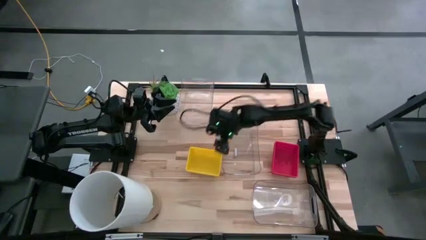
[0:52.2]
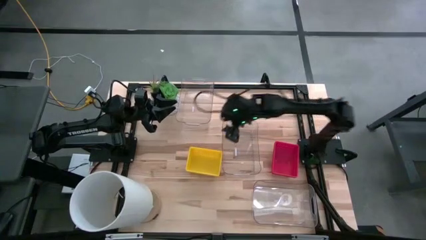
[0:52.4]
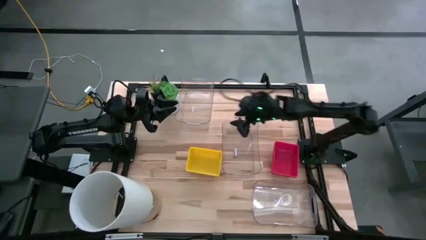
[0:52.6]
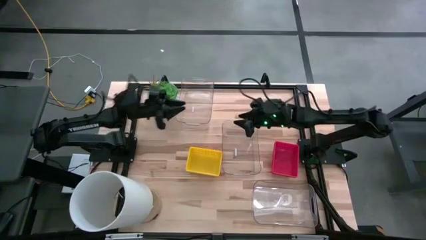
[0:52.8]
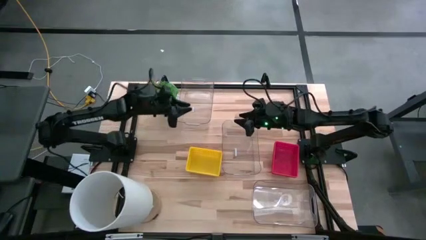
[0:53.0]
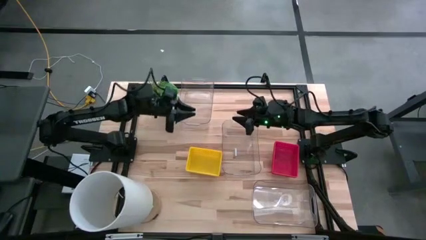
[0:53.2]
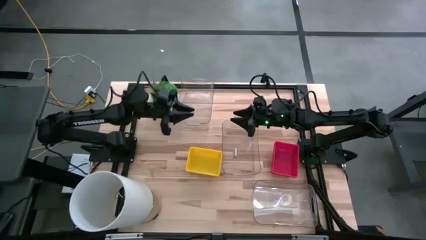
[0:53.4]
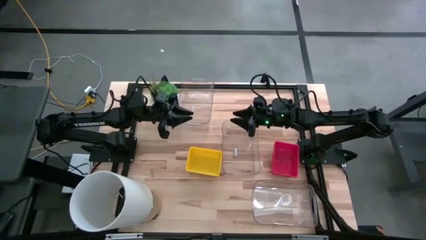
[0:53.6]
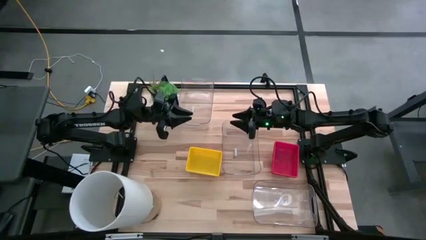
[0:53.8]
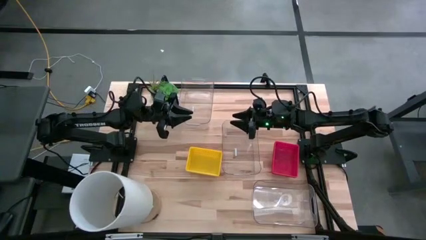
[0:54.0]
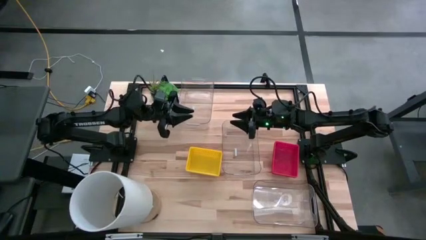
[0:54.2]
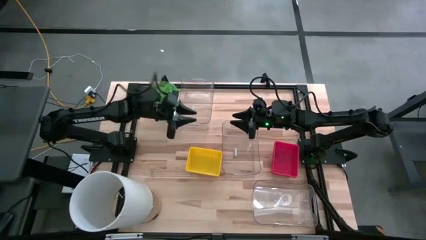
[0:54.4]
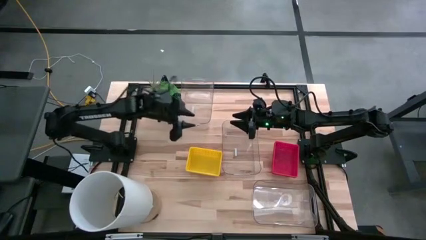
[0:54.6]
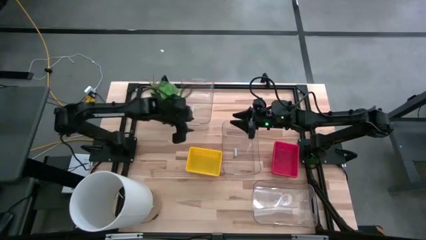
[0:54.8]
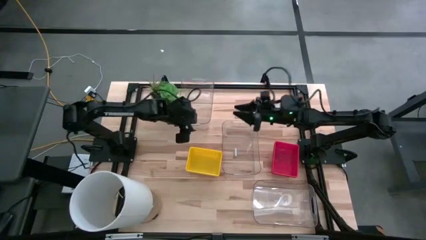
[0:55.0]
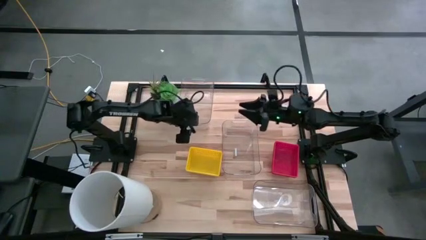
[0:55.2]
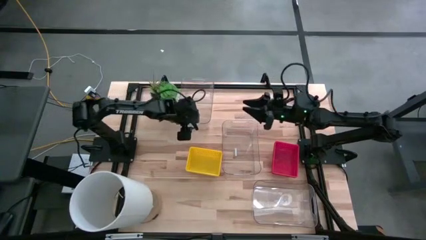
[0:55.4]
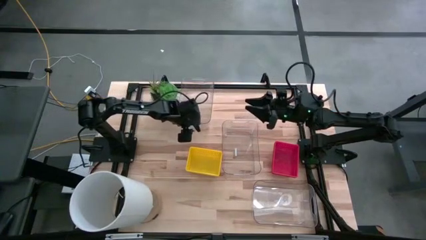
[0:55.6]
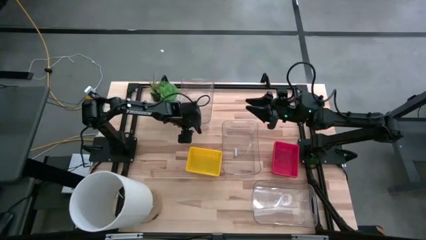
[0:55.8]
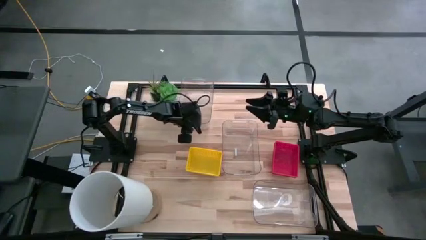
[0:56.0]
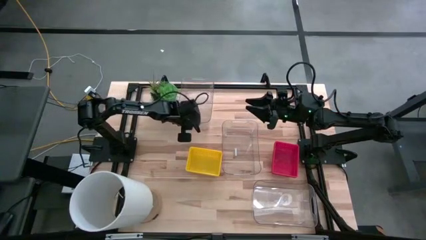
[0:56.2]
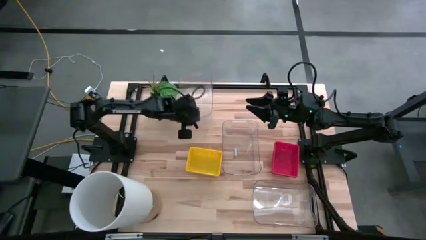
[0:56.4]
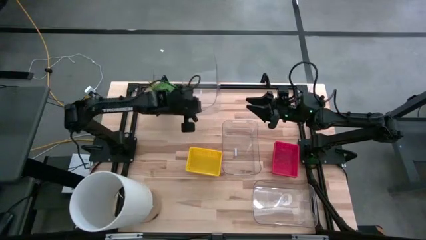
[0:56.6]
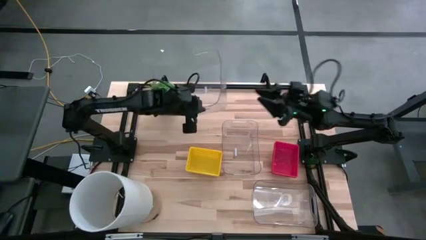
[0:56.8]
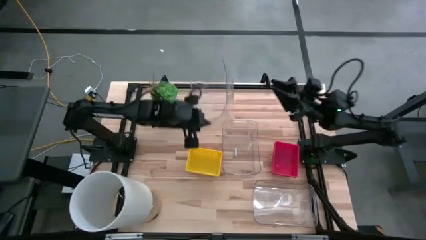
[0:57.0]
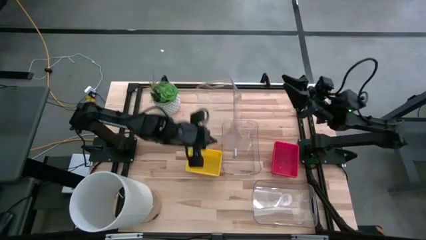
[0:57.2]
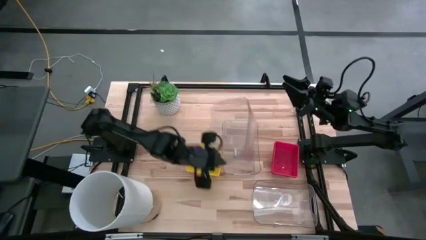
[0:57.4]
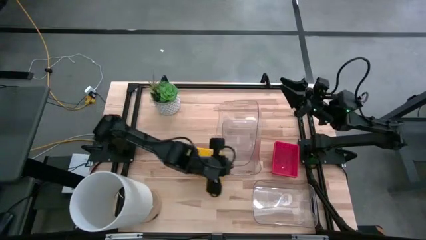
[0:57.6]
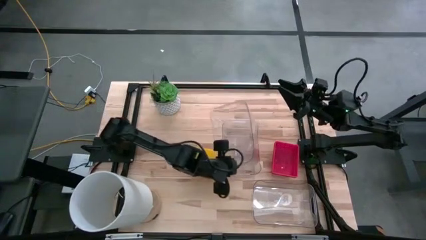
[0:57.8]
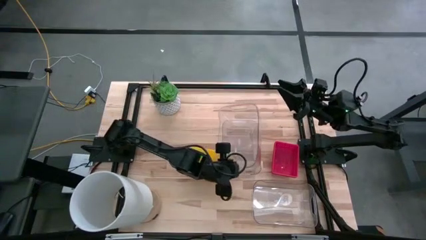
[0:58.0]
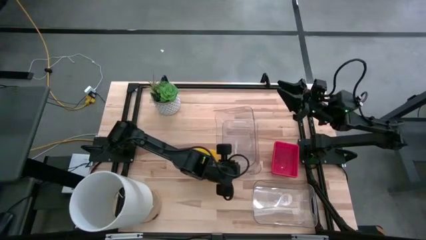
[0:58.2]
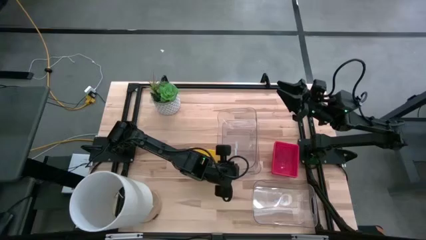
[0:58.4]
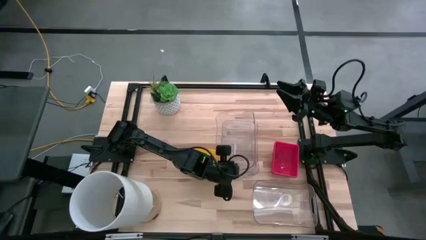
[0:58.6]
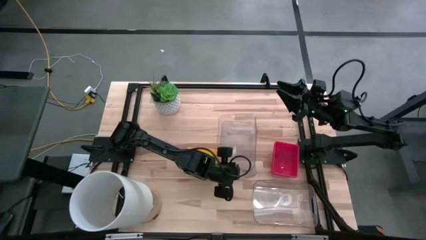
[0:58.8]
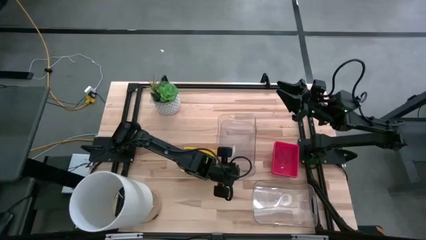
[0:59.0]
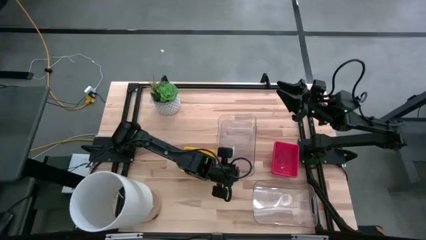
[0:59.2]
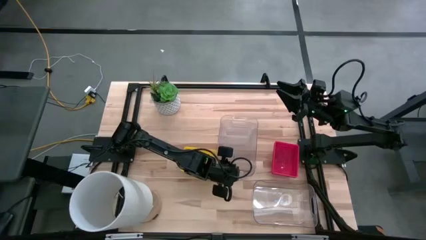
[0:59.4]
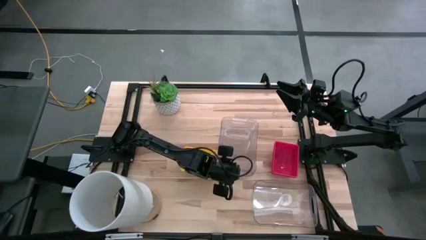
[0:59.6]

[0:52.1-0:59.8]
Stack the top transparent bin on the middle transparent bin

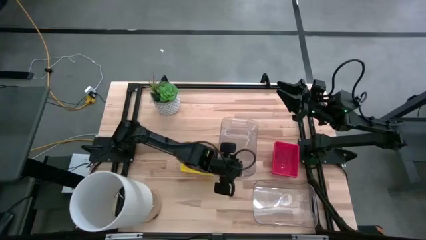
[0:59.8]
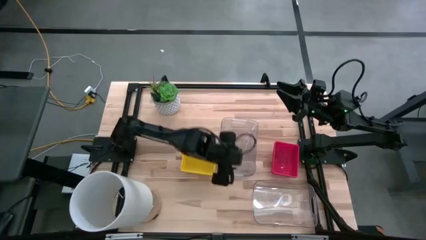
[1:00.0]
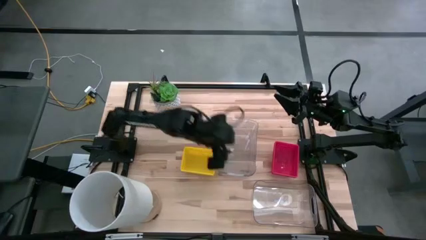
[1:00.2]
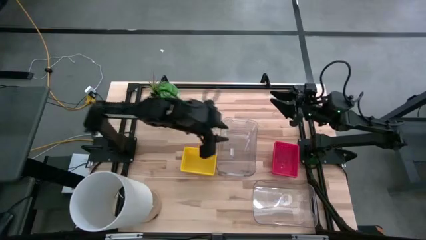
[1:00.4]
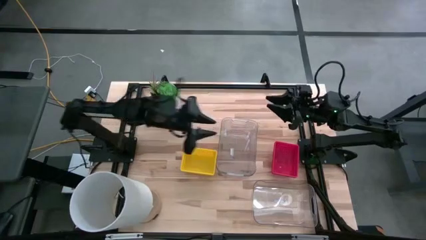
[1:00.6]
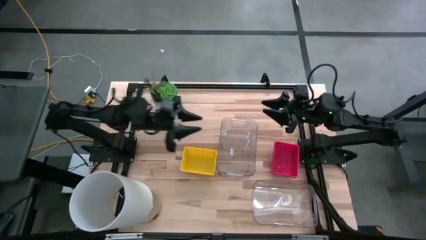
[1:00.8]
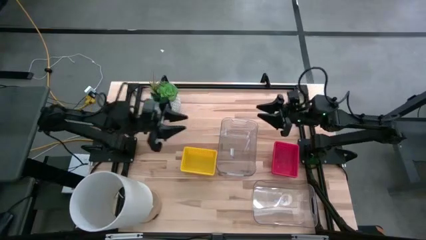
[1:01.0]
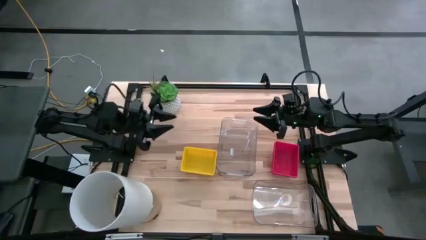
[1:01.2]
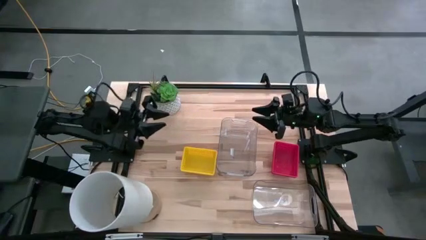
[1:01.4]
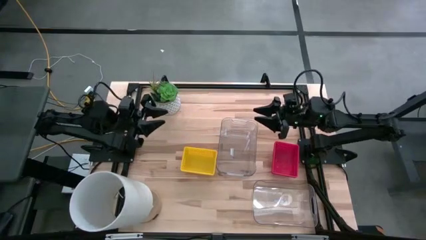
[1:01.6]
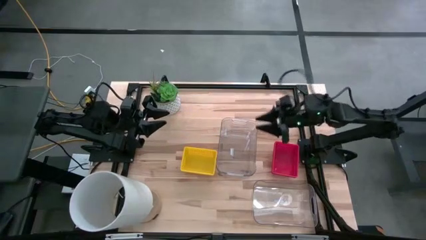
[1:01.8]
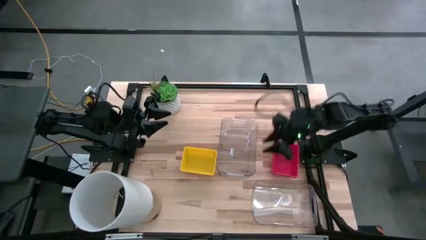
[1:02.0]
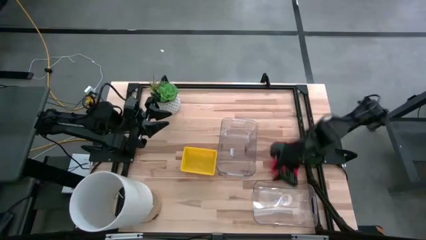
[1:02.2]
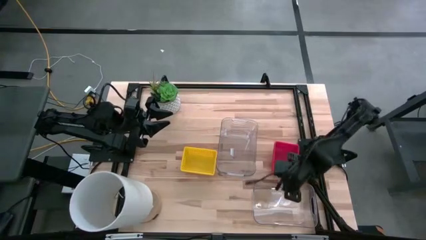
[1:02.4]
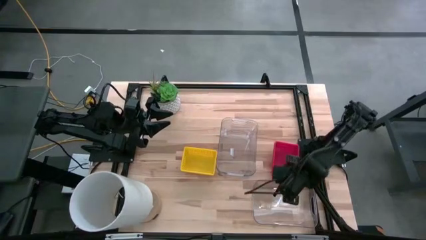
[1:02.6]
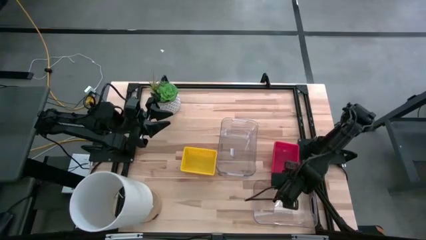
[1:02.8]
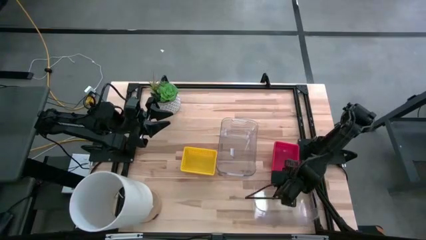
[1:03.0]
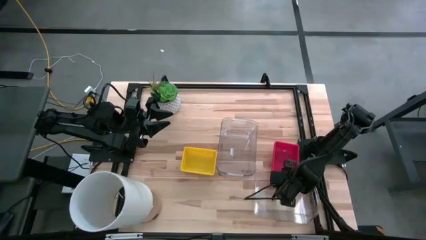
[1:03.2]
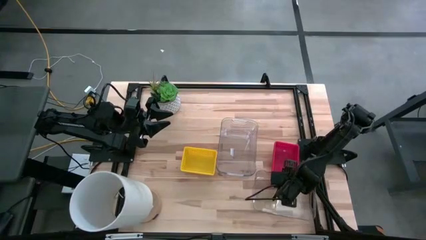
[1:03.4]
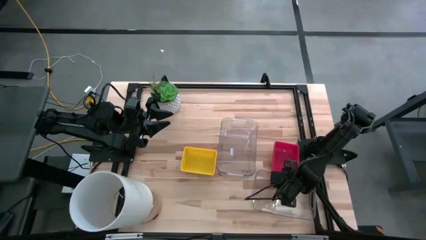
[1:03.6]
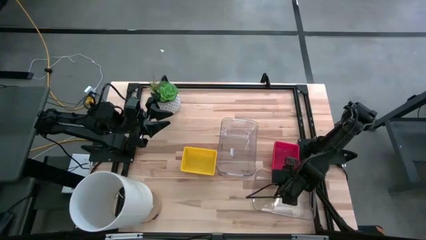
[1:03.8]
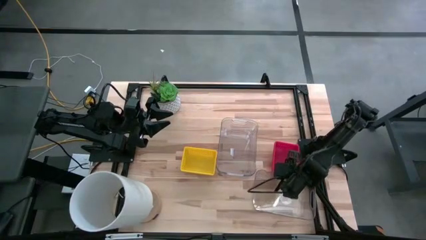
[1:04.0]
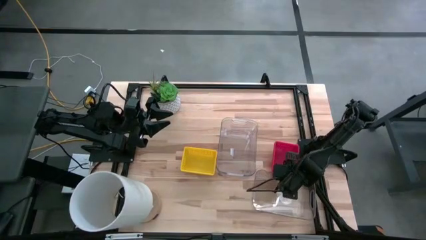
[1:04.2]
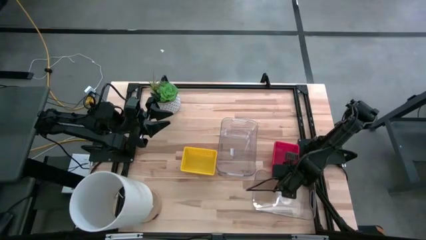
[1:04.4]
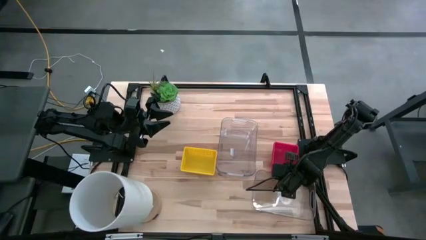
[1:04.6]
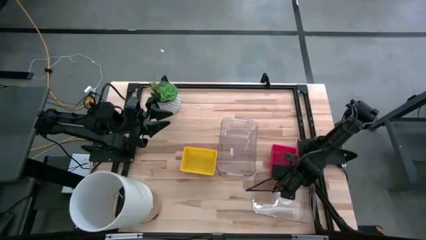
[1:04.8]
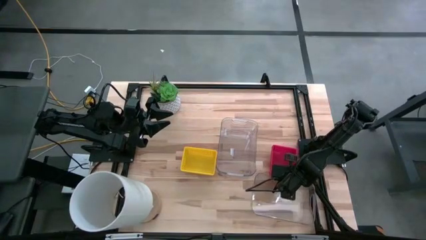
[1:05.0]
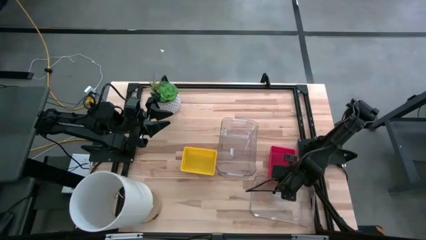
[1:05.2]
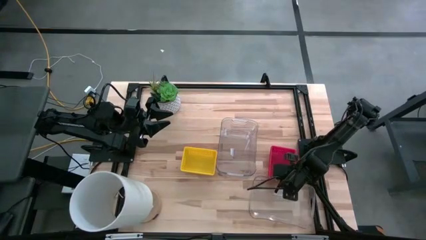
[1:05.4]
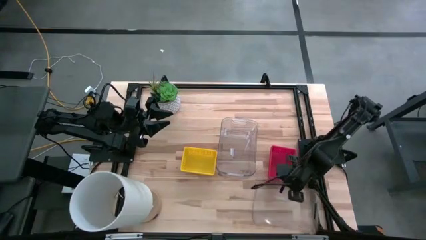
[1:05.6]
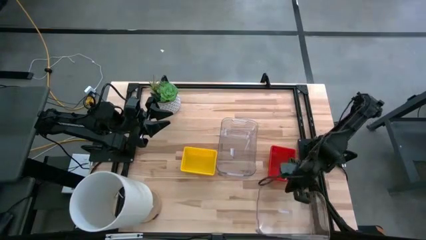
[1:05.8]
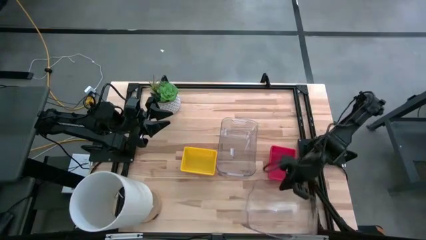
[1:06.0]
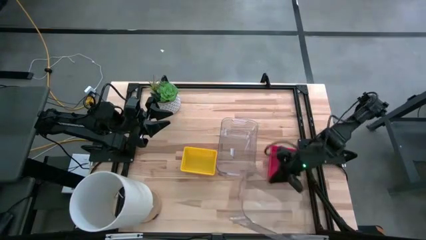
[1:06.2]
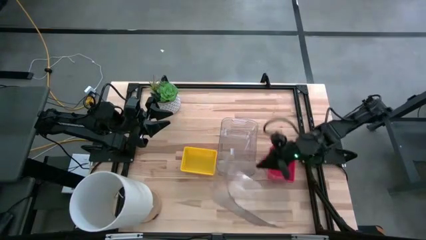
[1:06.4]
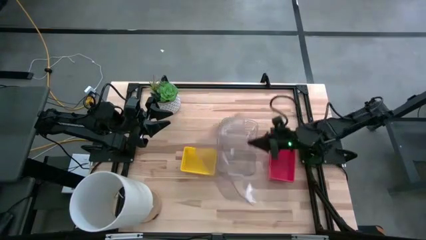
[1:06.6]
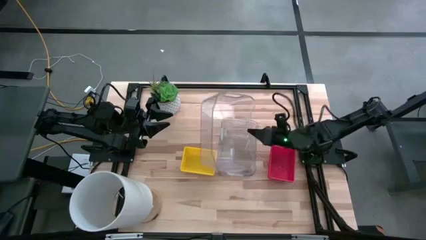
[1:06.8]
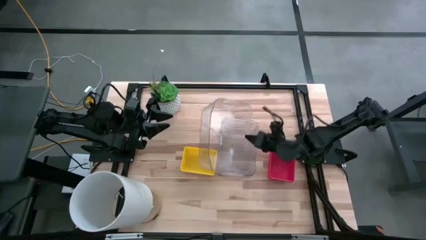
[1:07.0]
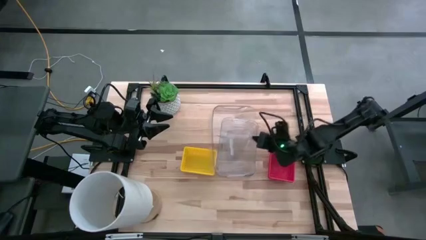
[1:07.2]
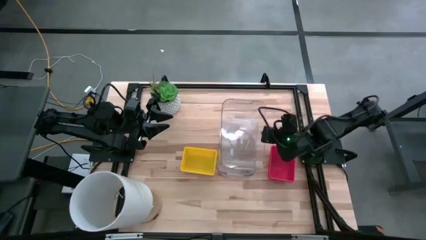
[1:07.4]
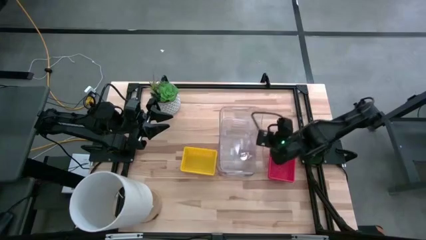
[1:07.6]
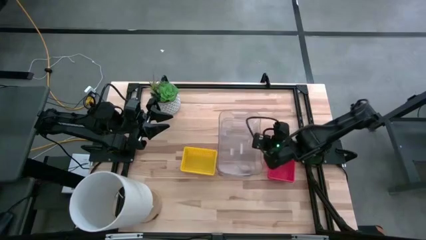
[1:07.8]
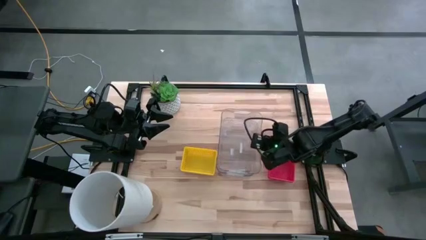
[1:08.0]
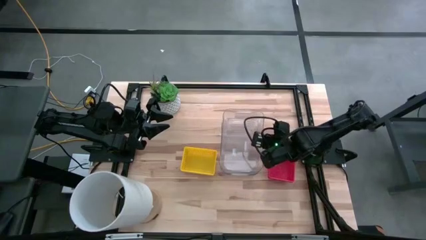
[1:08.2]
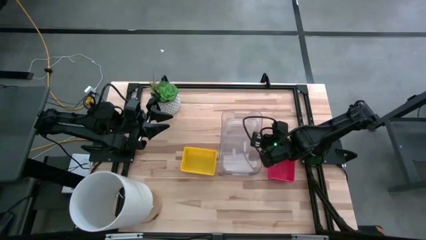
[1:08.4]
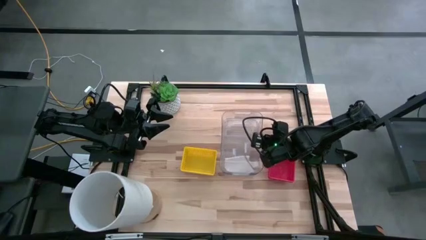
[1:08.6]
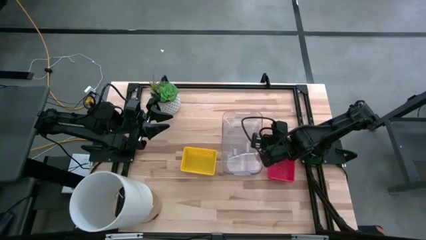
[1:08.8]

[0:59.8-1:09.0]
Stack the bottom transparent bin on the stacked transparent bin
